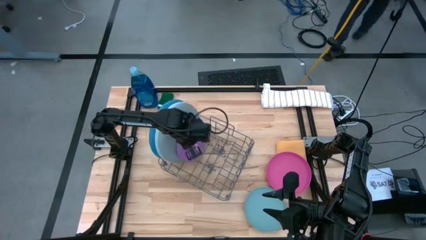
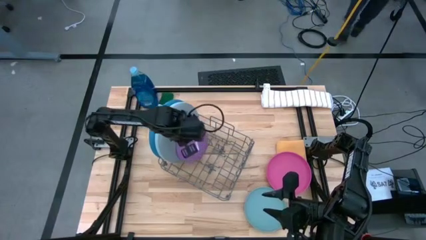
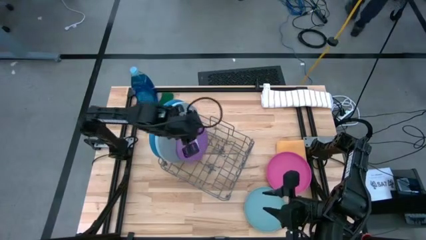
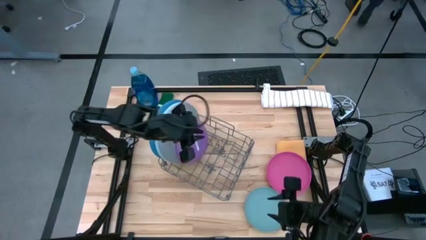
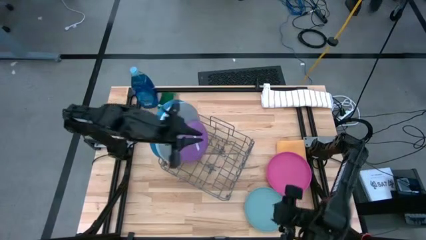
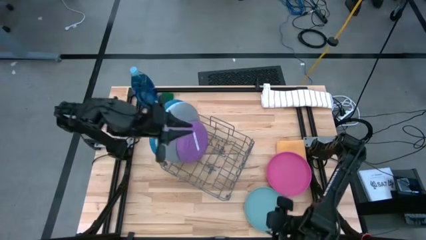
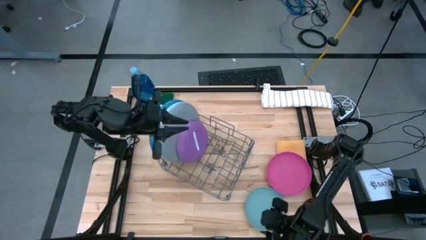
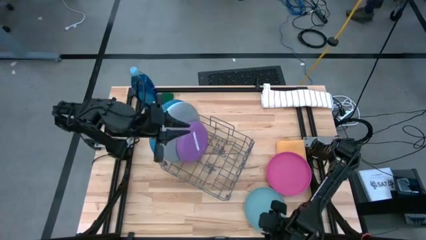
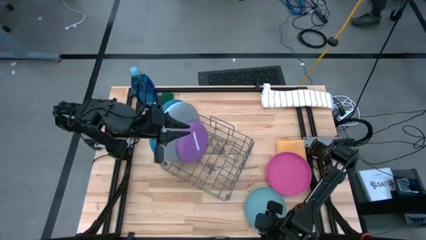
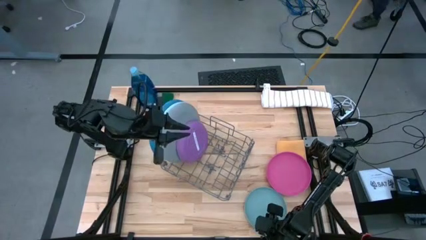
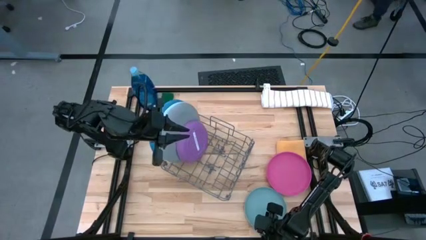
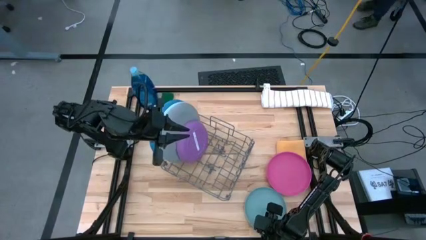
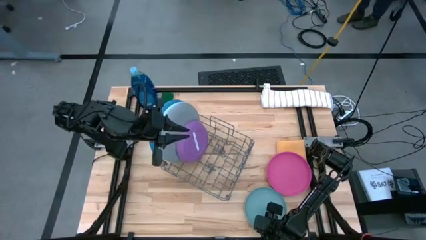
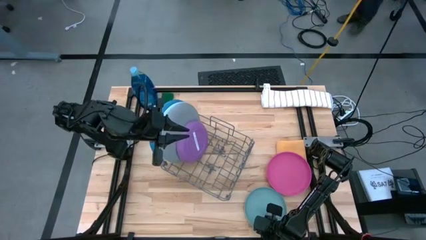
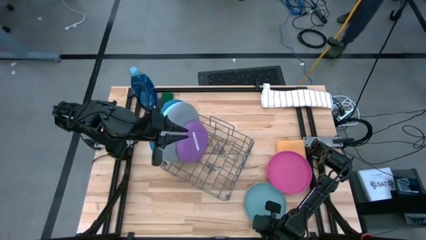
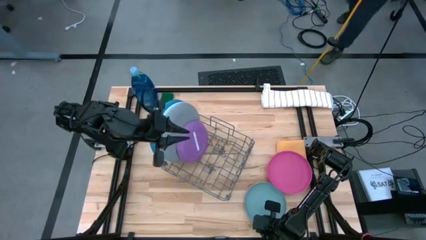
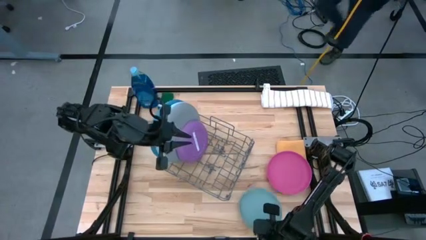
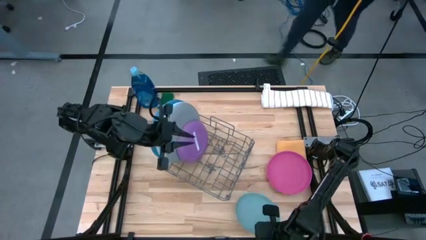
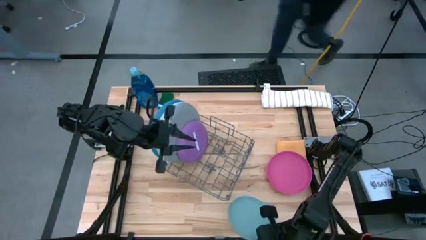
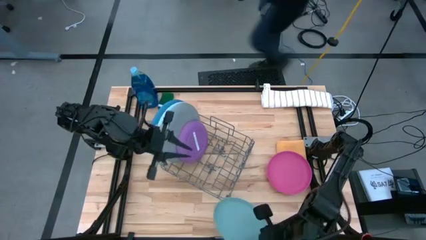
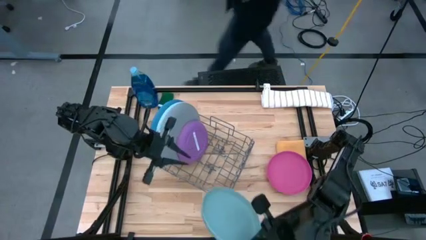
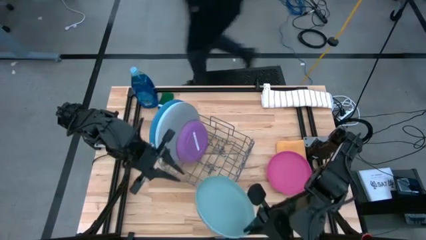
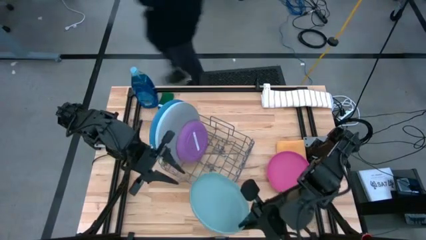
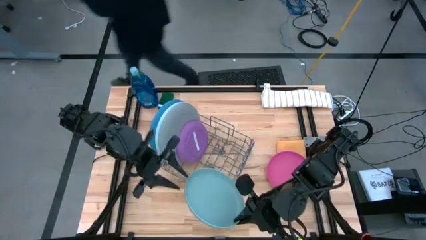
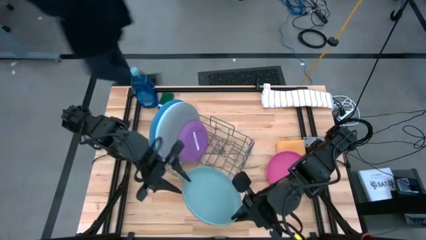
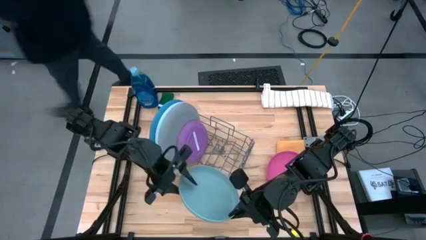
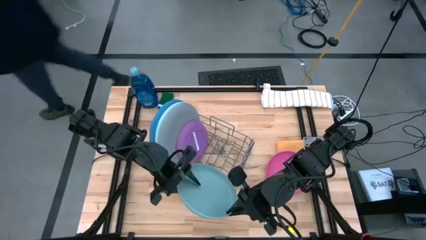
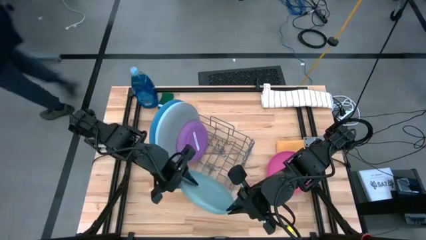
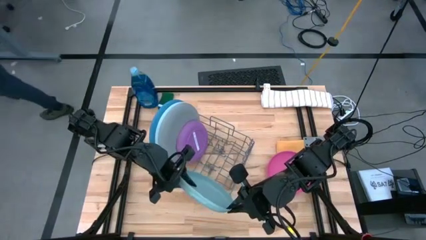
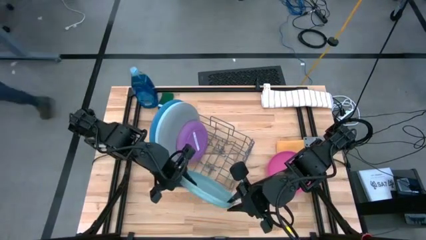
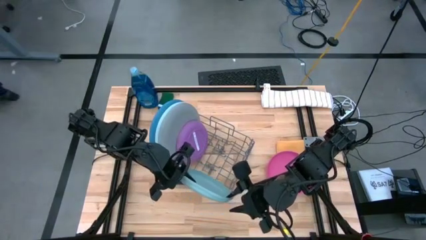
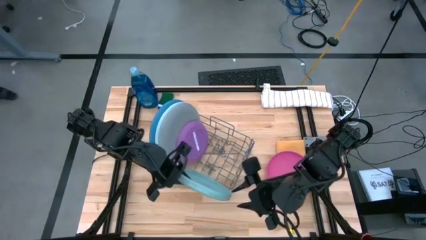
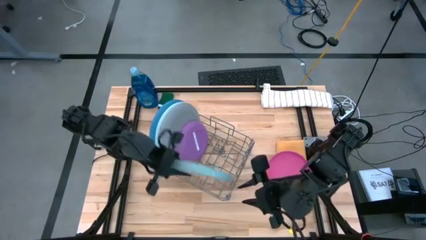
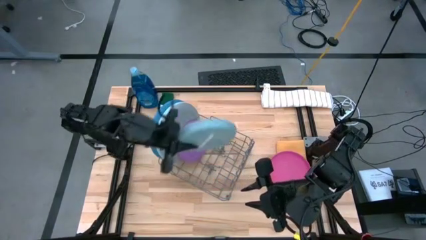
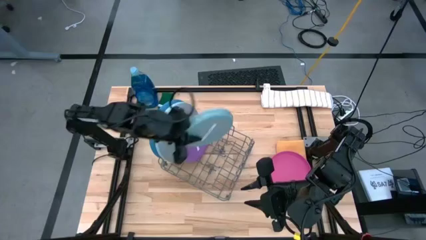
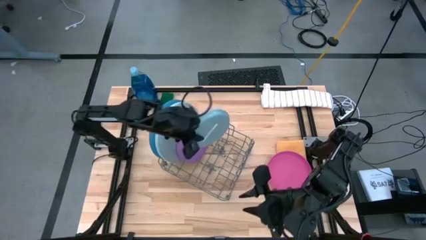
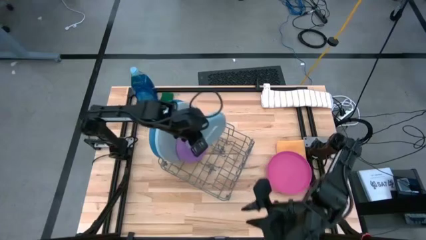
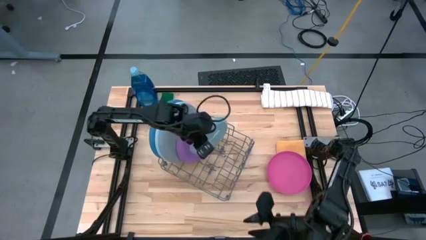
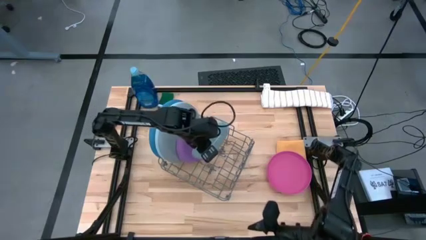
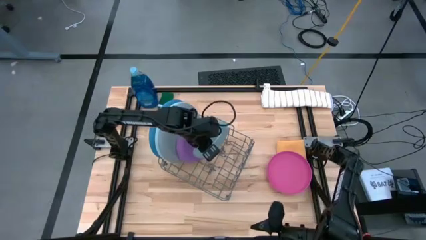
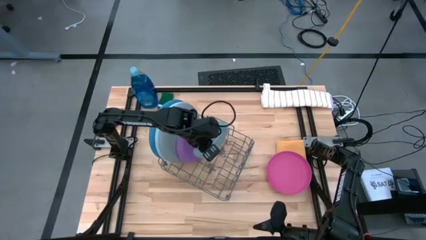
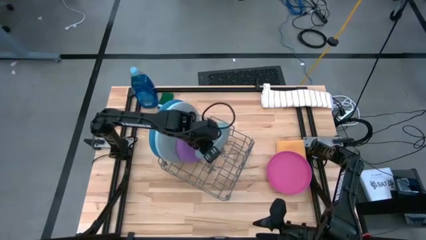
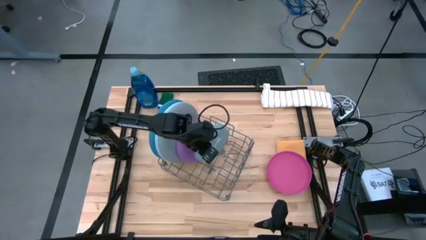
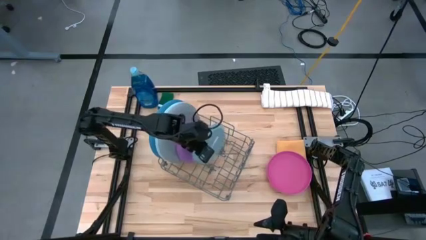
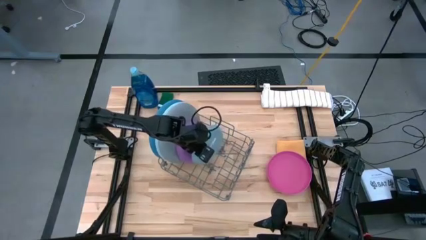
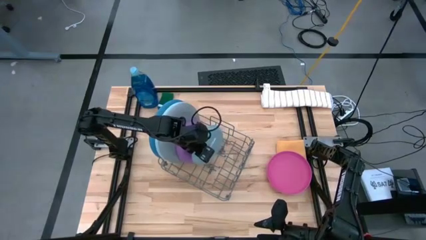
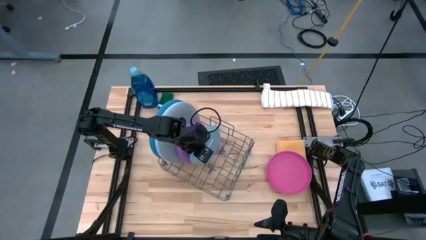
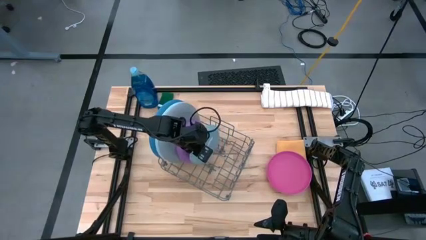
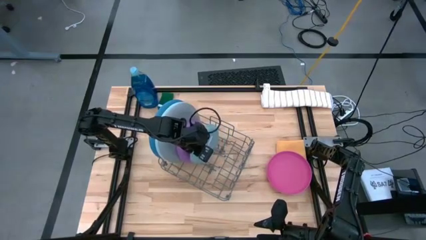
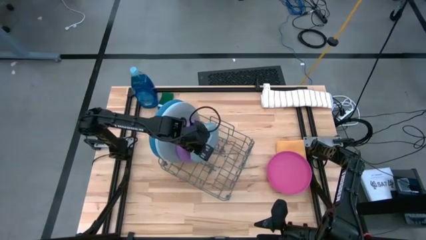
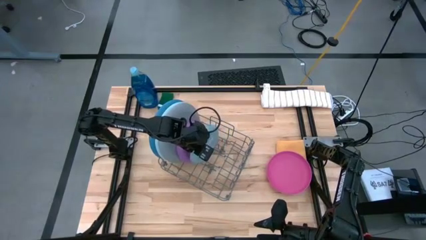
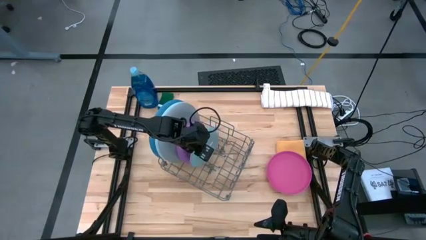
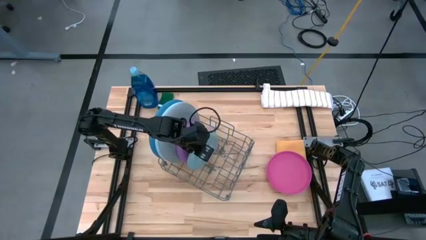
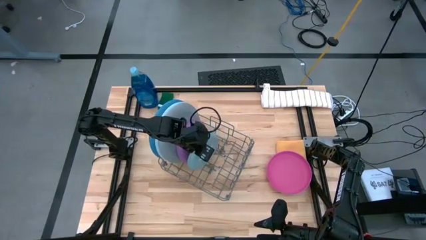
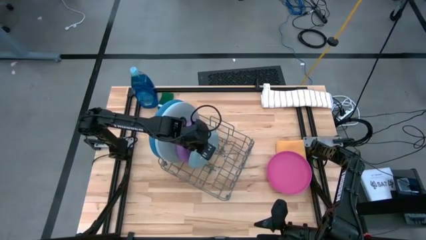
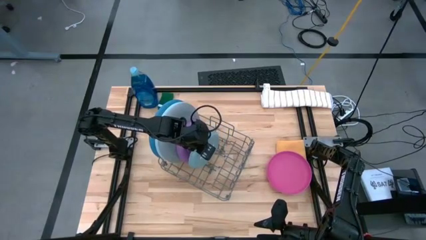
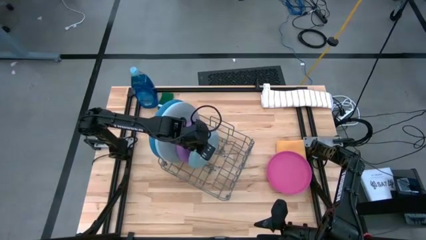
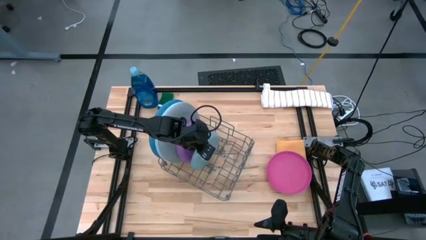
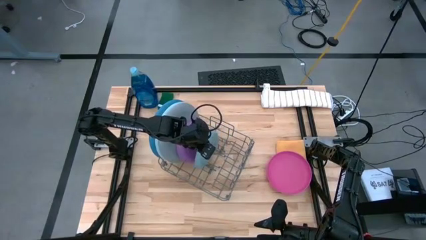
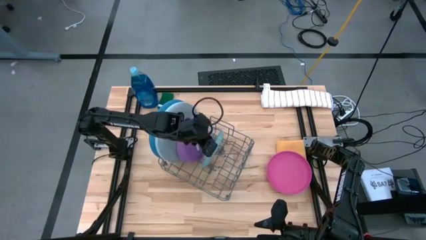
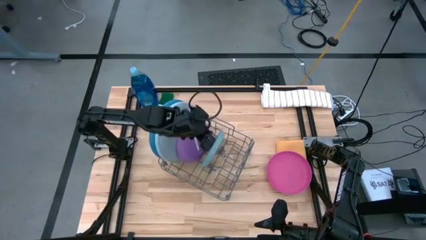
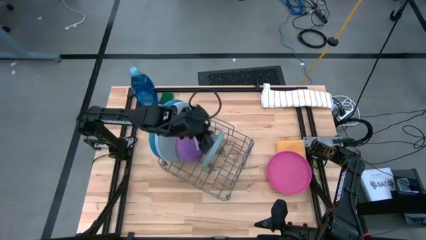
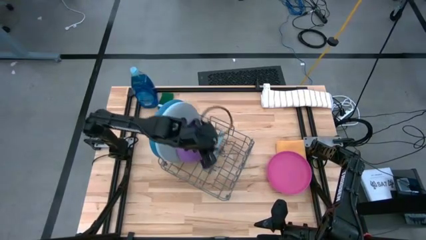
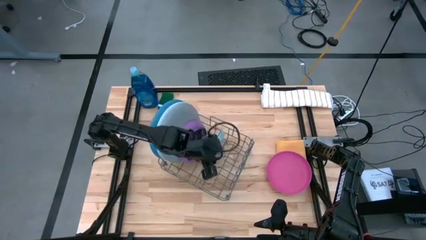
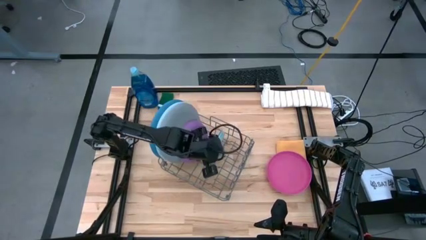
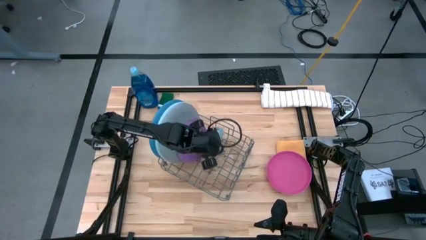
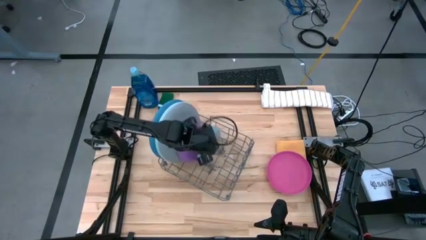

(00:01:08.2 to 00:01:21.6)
Task: Sort dishes
Put the small light blue plate into the dish rack
